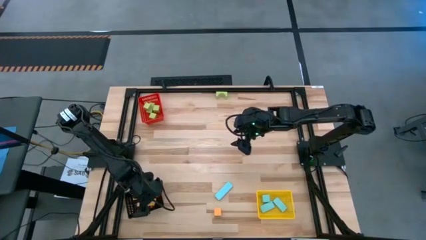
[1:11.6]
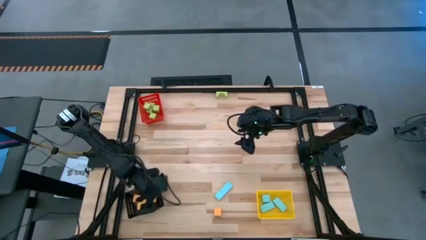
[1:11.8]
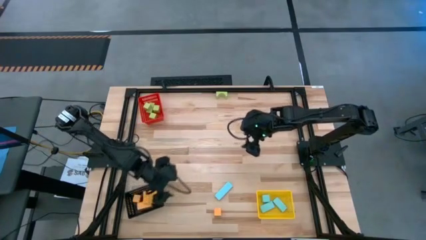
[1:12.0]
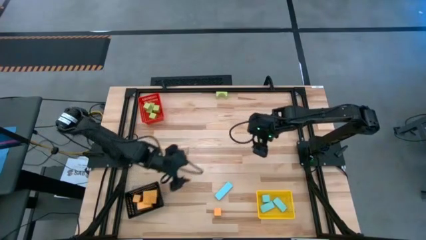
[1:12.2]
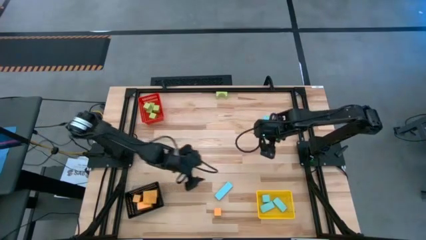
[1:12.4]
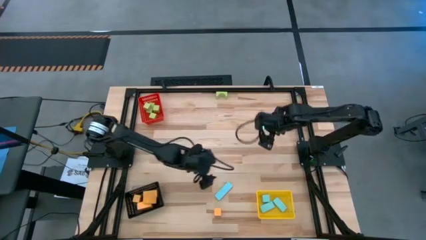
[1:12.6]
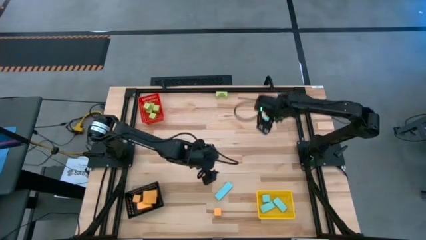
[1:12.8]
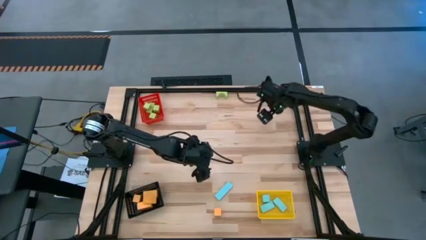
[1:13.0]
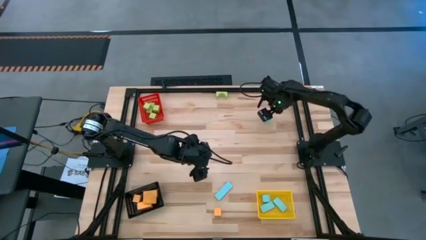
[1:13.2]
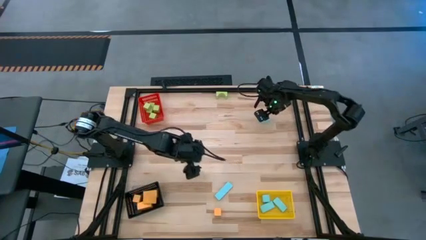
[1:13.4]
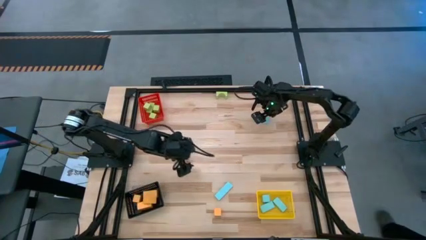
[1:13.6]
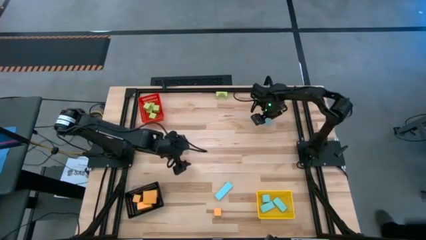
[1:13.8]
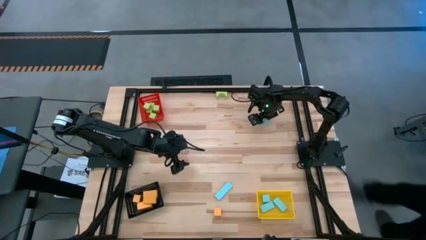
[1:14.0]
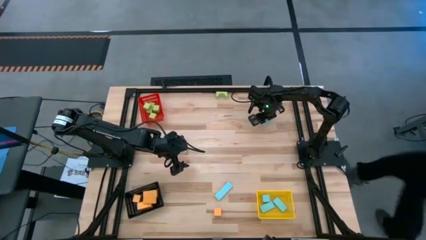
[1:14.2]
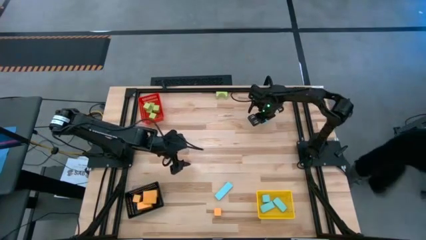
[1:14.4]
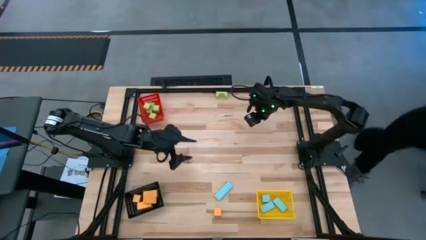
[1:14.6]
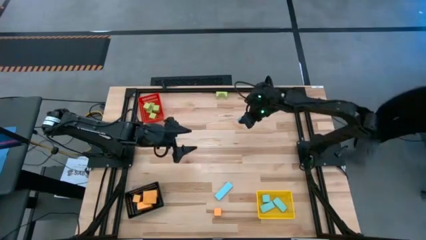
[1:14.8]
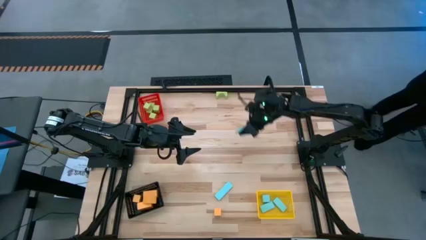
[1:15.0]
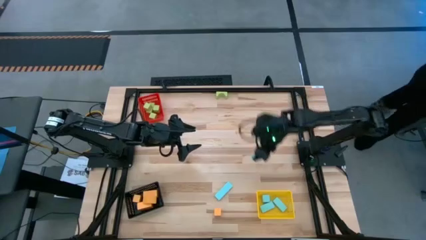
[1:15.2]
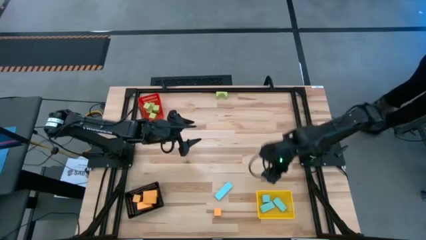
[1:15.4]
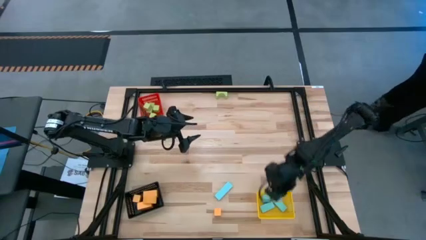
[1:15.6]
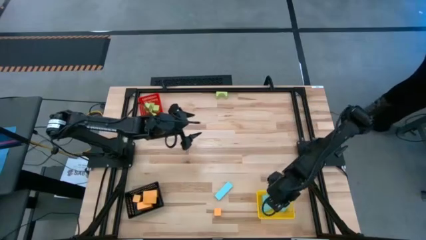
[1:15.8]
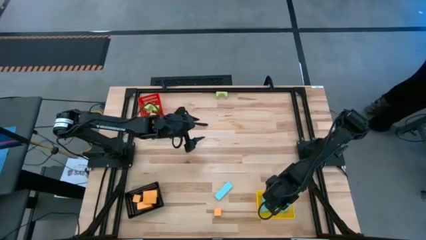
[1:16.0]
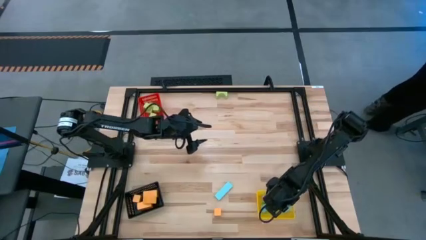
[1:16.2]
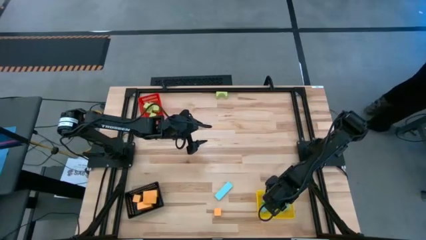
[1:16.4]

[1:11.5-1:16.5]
Task: Sort & place blocks by color
Put the blue block into the yellow bin

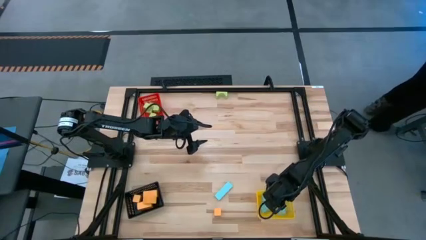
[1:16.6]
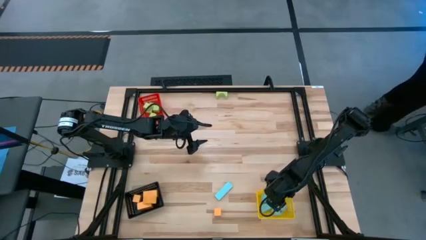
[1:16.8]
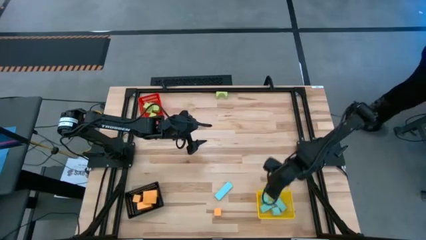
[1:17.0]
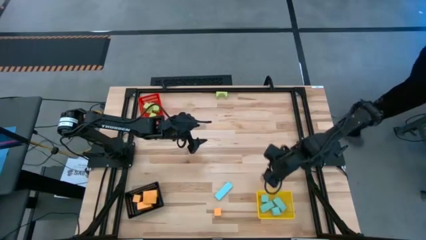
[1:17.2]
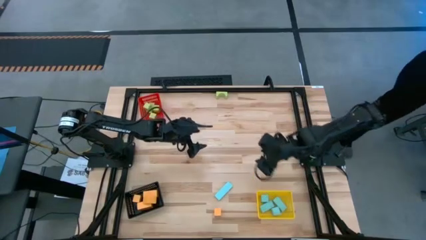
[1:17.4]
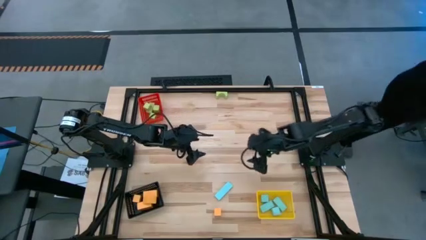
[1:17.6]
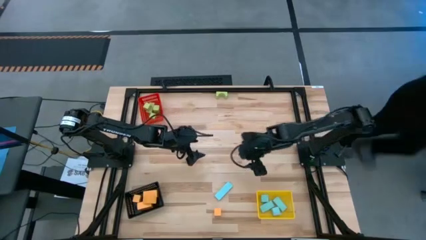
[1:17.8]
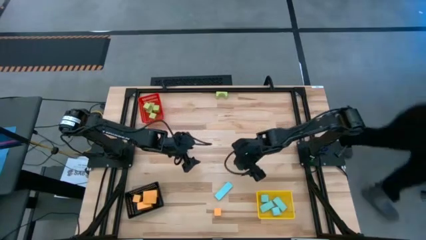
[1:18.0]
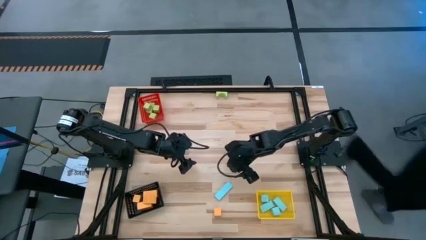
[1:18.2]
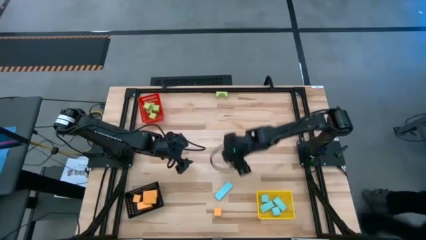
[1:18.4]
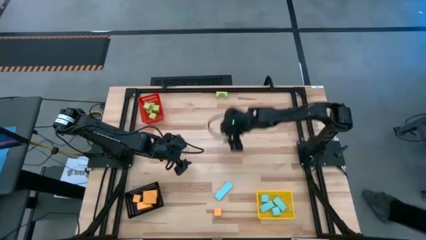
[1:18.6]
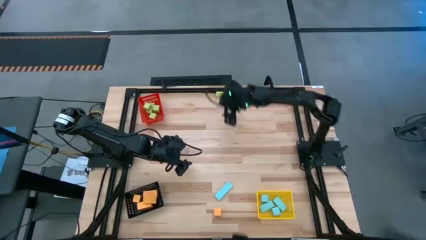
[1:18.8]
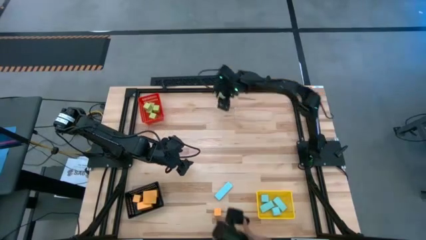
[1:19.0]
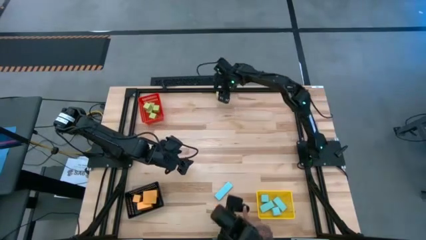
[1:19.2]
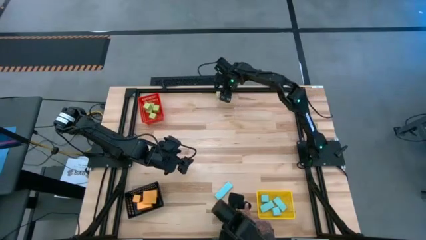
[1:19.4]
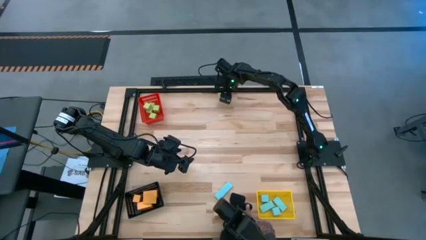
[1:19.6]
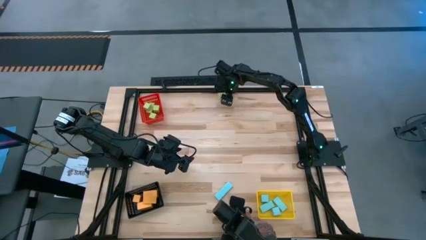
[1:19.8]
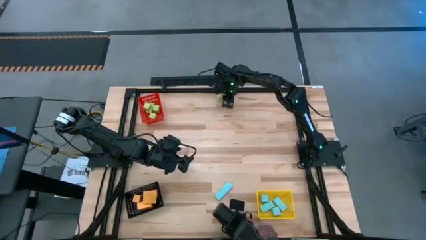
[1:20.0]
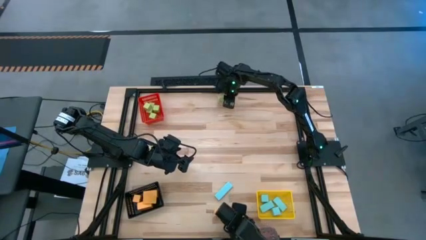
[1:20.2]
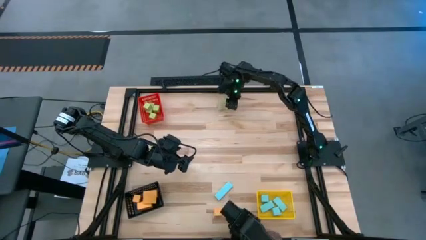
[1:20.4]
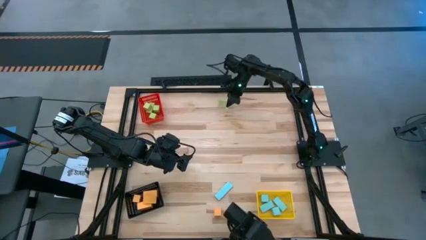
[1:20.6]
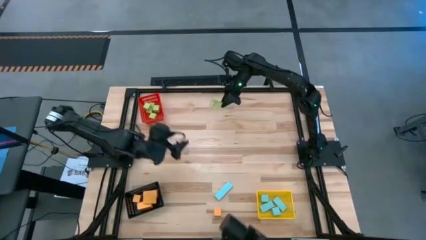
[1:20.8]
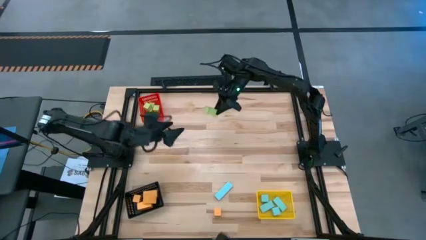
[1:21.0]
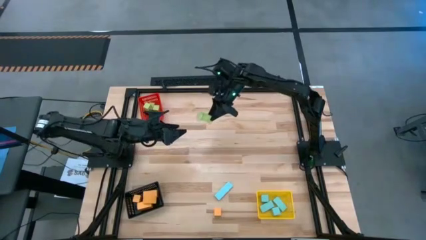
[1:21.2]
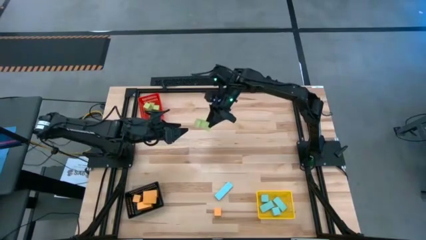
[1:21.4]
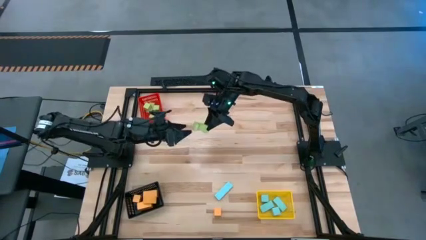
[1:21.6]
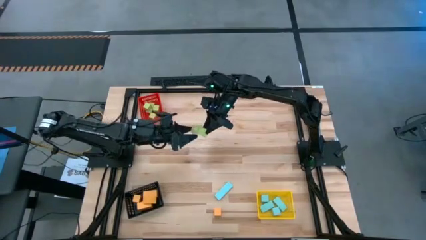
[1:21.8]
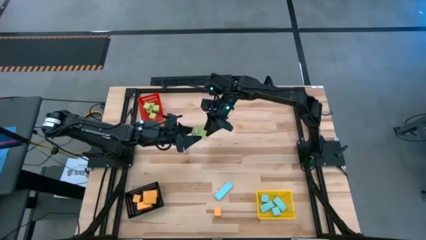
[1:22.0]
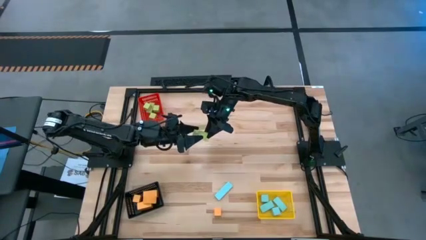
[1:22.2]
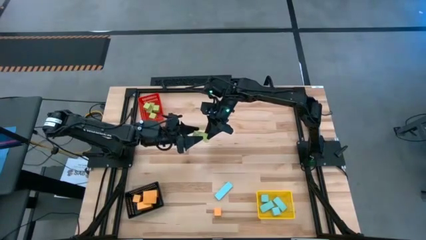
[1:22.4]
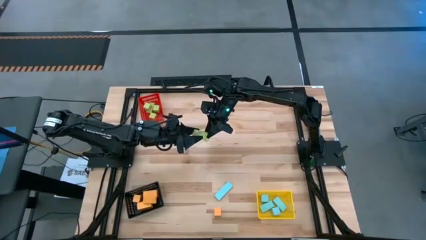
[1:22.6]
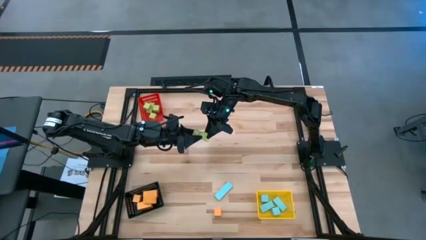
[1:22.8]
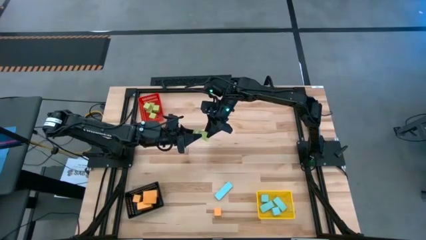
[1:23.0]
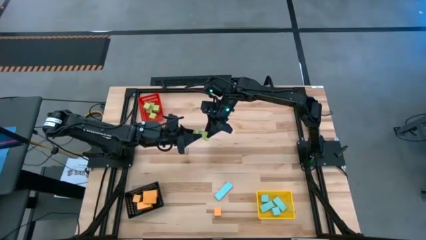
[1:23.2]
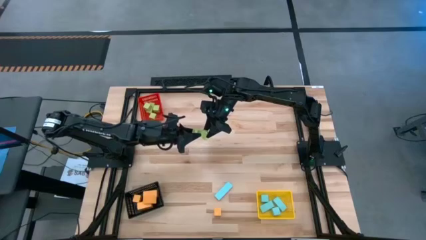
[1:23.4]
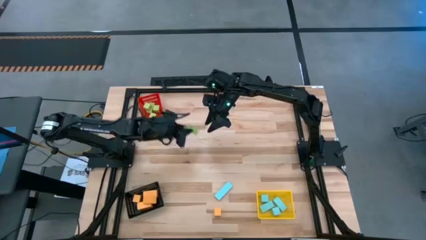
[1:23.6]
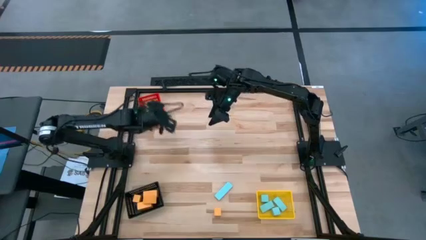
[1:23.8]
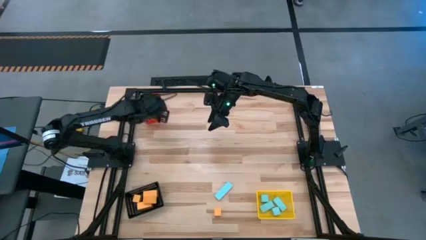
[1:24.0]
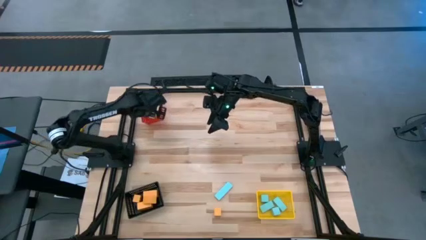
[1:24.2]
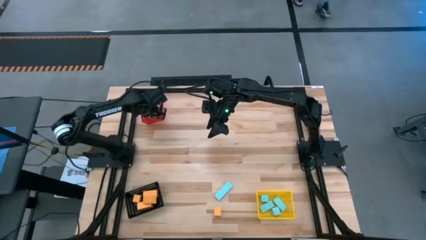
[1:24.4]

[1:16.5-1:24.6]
Put the green block into the red bin

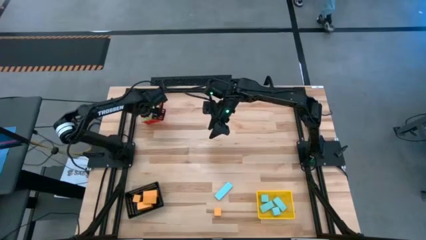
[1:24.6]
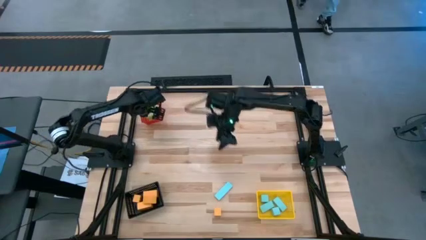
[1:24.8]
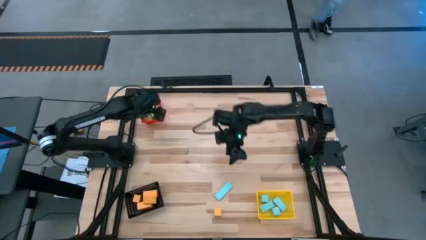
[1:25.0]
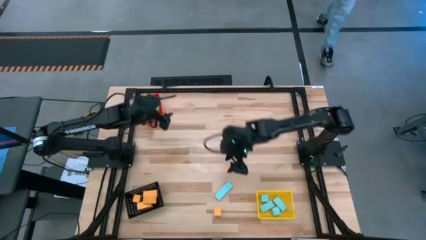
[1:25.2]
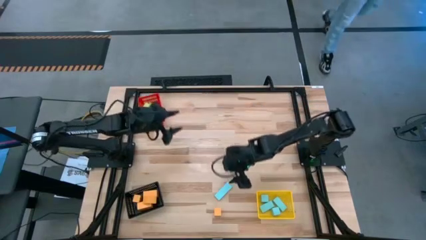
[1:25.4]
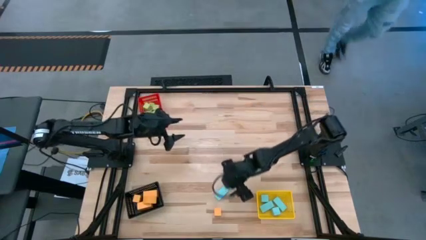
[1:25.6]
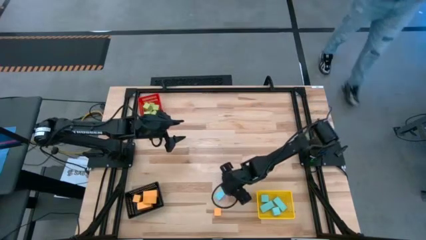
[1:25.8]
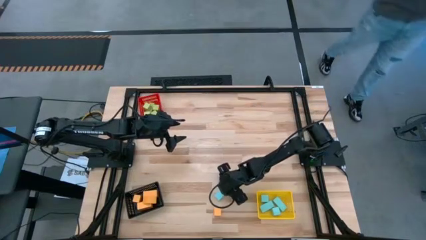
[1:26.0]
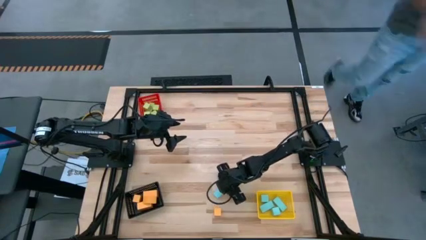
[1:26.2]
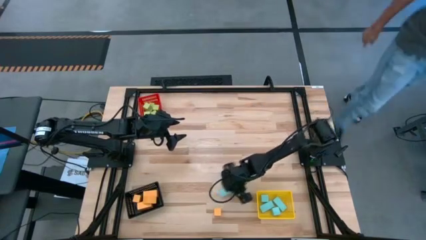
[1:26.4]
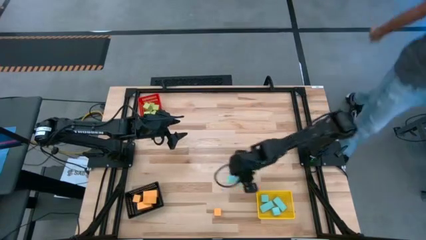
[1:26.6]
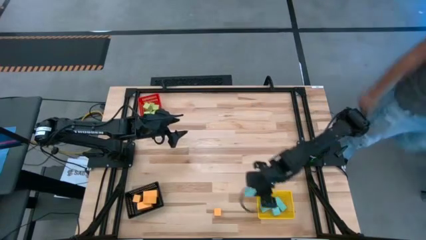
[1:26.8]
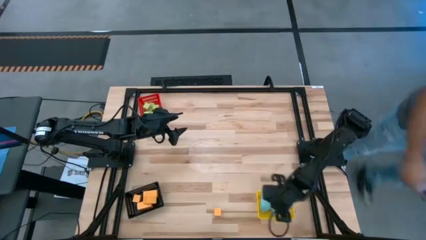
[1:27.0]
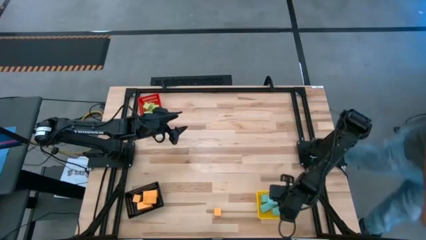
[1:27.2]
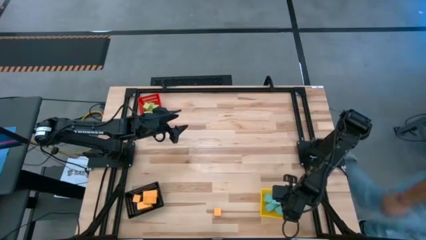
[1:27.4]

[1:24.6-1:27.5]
Put the blue block into the yellow bin
